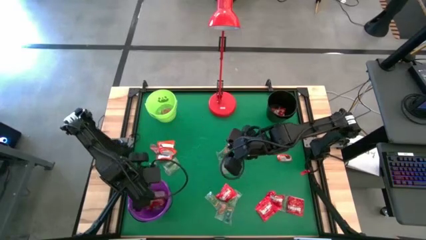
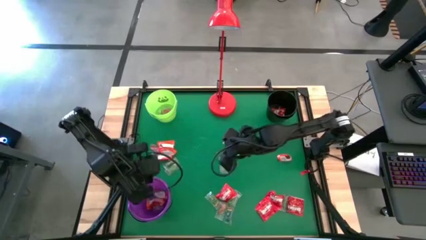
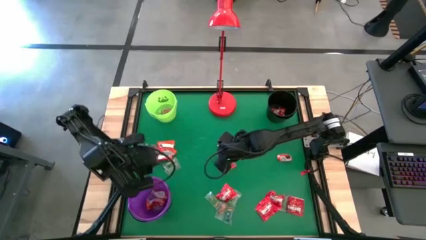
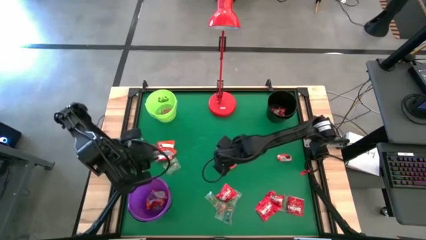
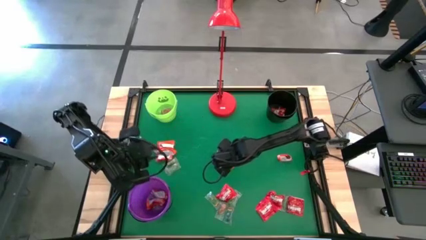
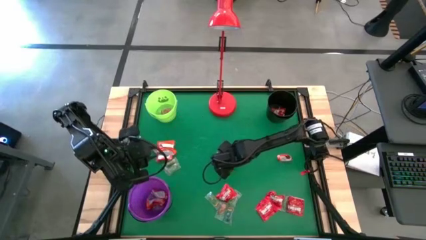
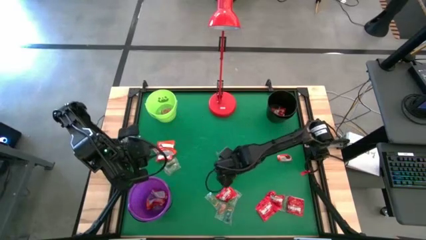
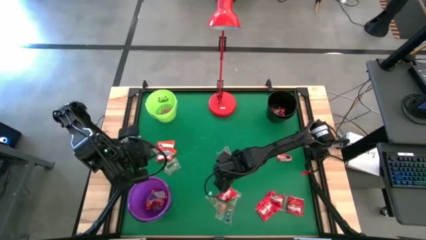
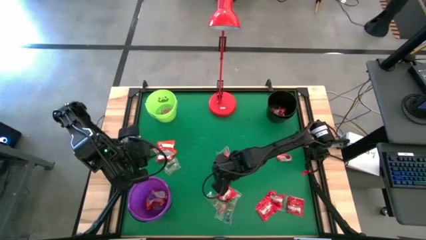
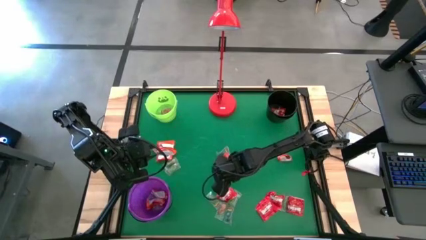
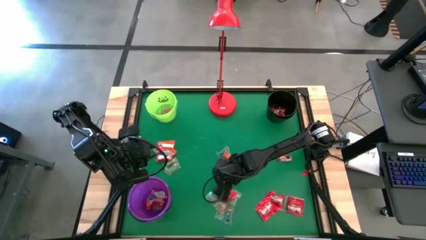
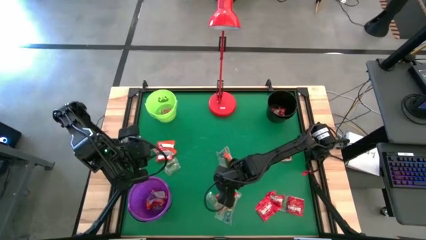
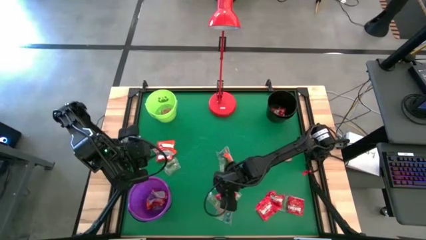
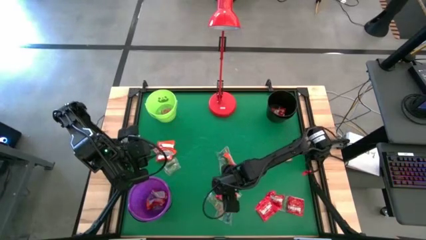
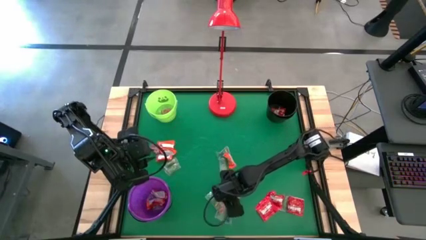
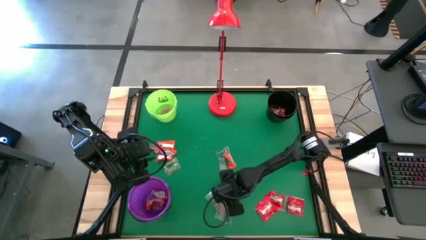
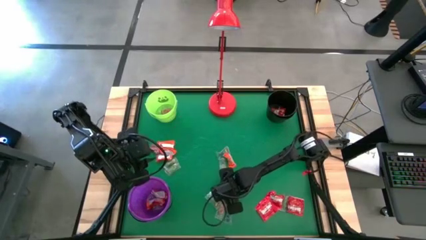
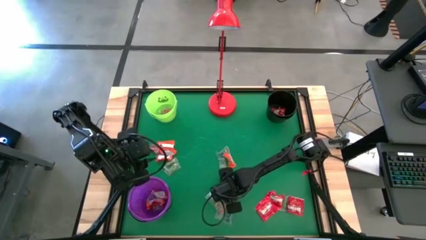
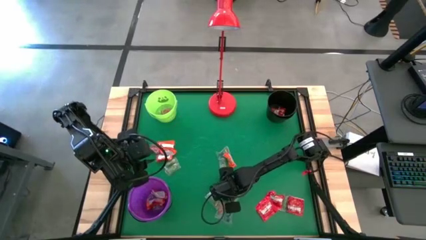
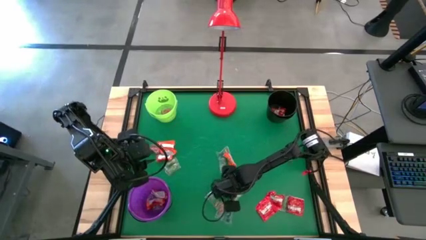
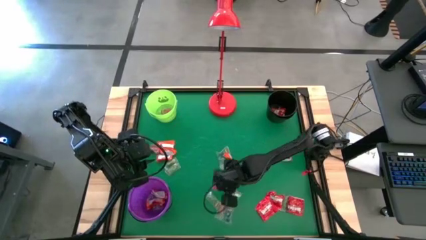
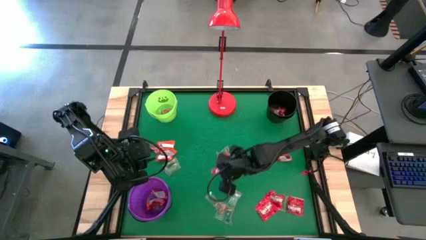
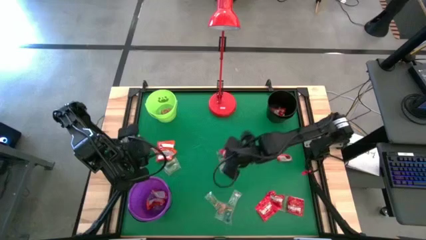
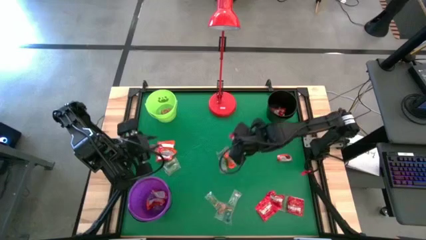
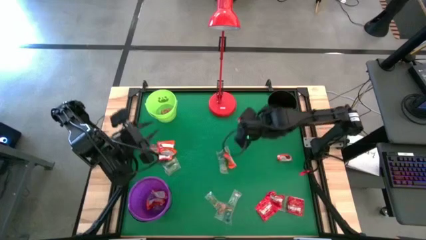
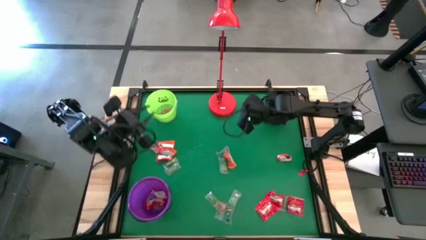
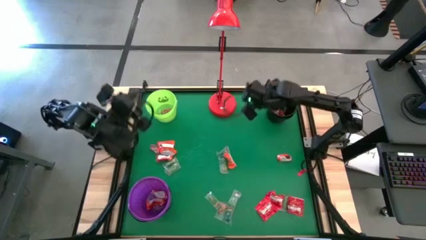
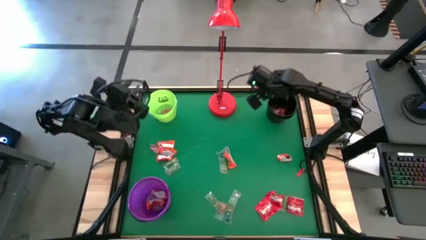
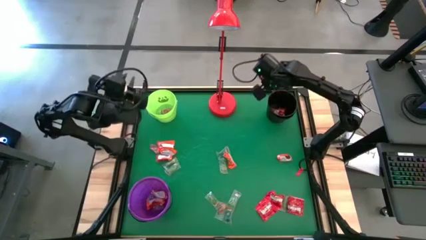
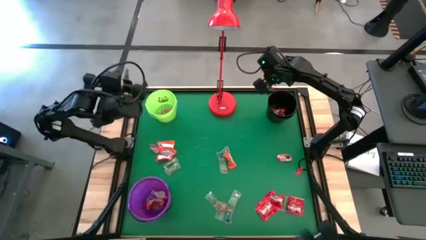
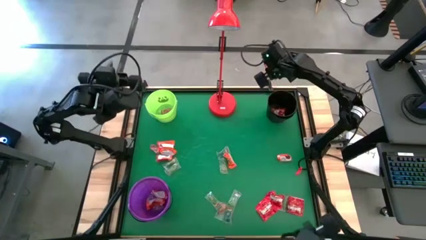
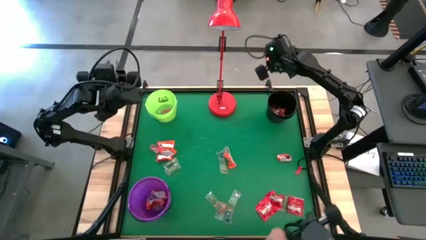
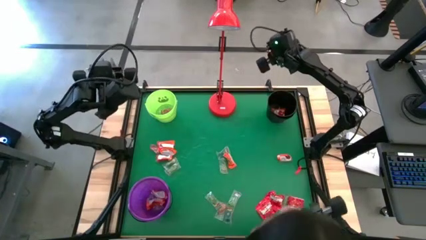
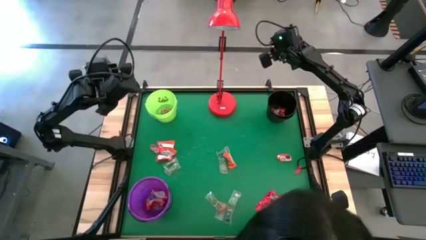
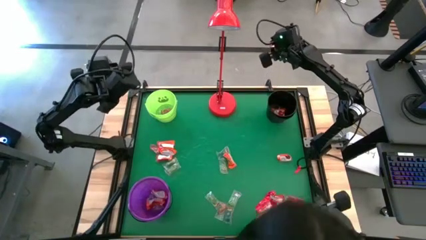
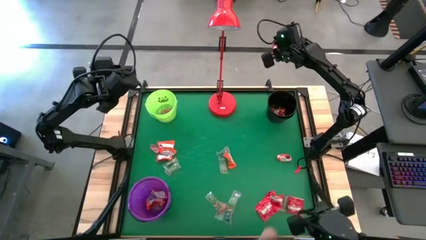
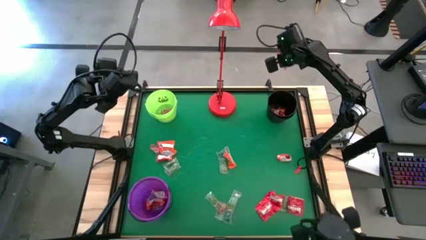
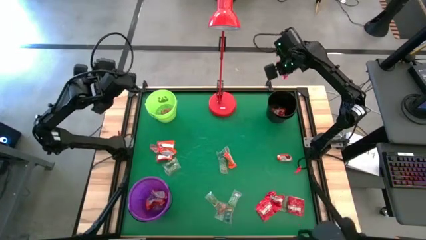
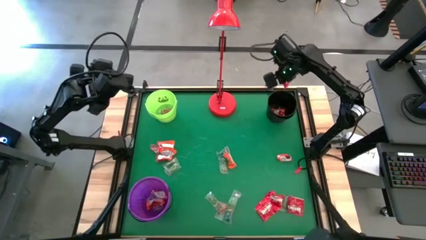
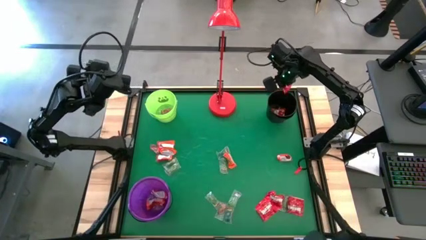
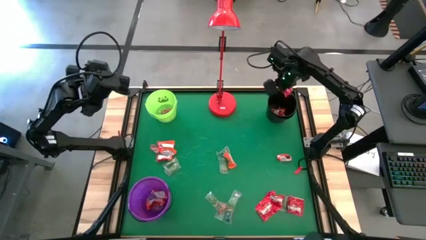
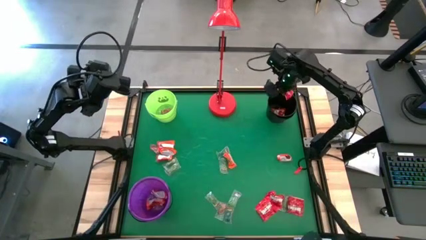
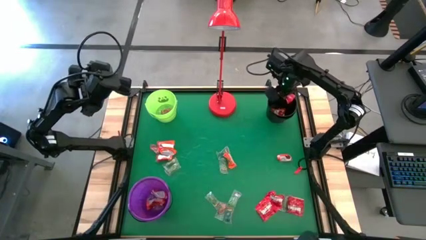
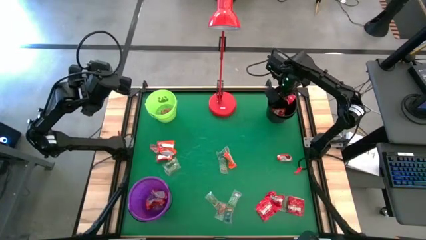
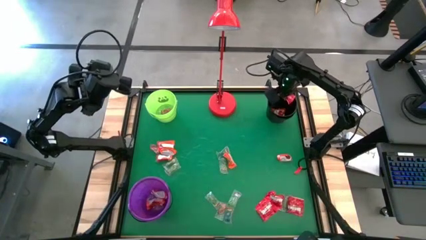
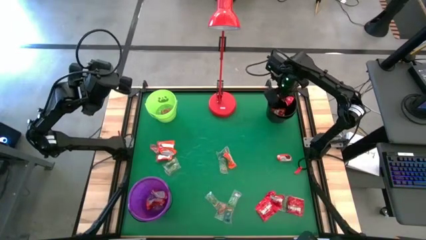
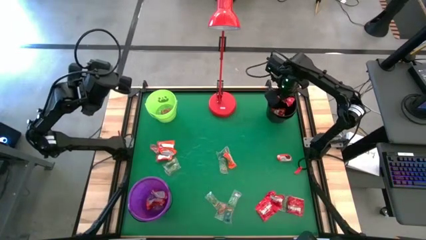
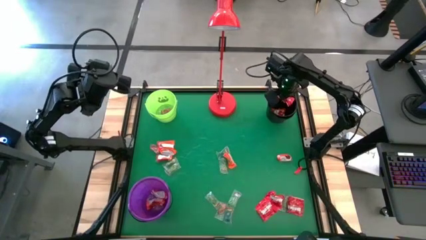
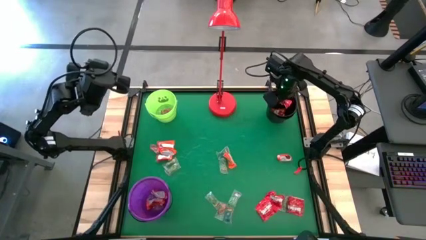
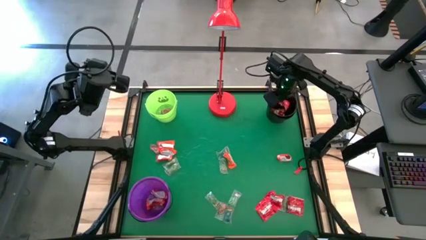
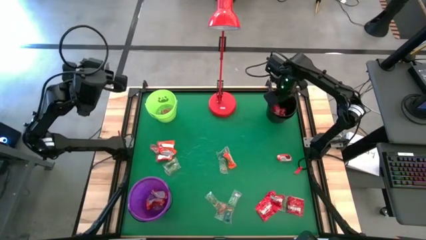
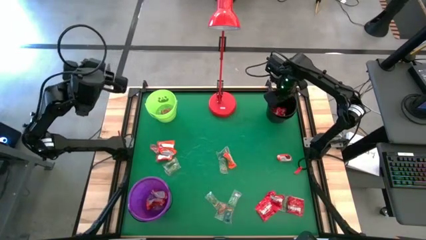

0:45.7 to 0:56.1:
Task: Sort candy
Put the red candy into the black bucket

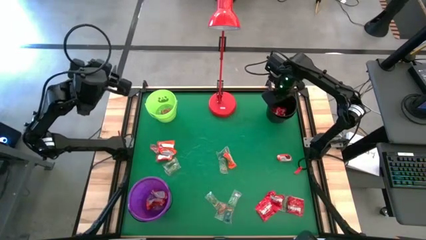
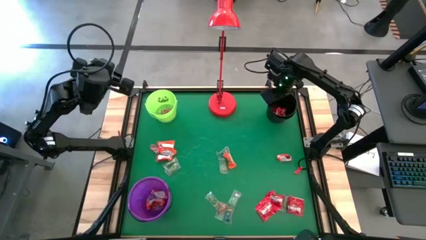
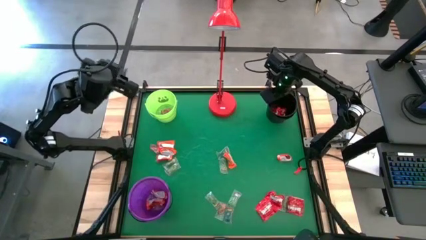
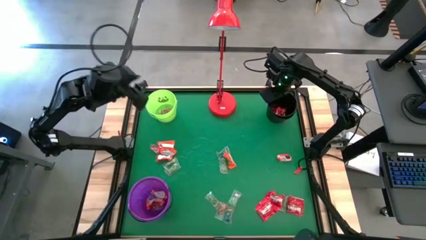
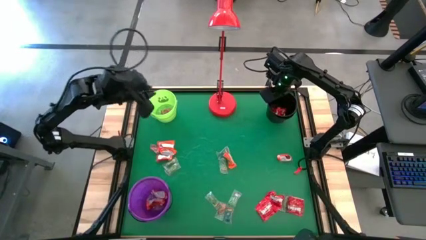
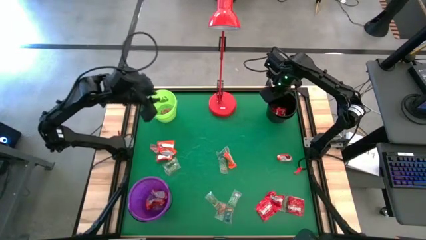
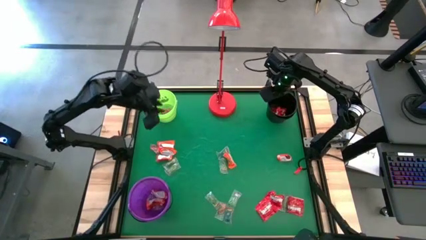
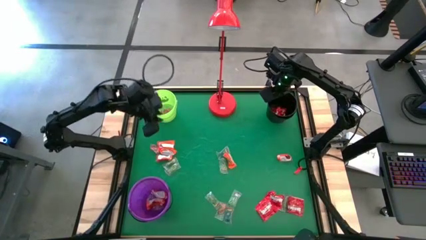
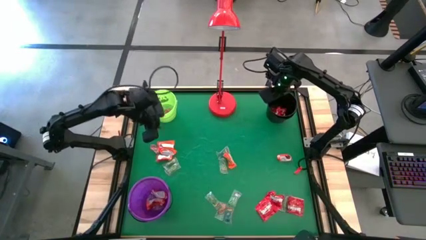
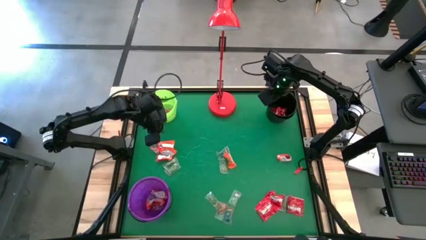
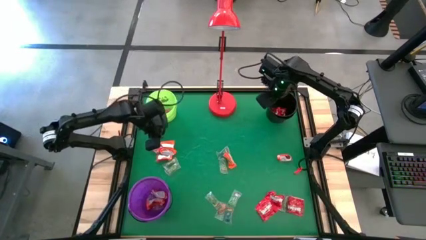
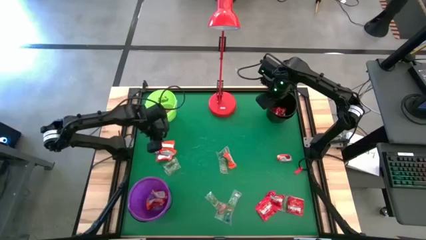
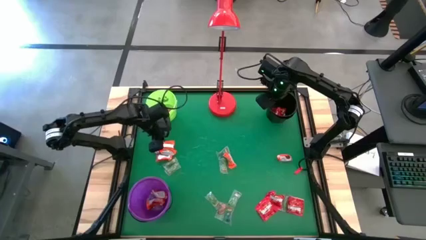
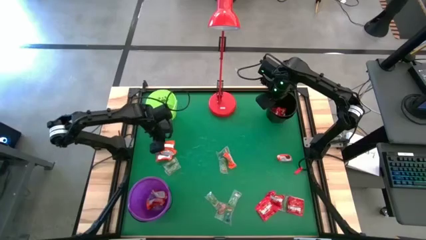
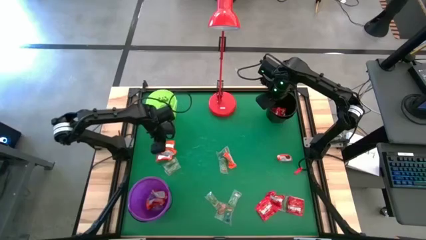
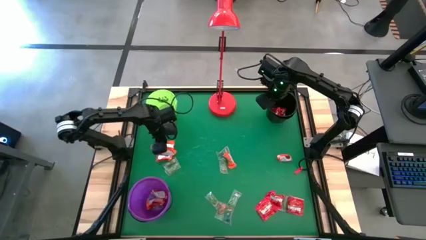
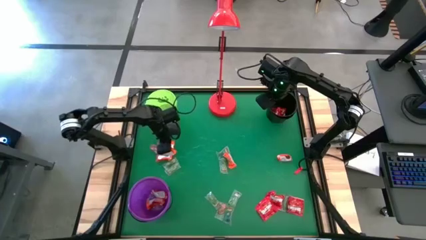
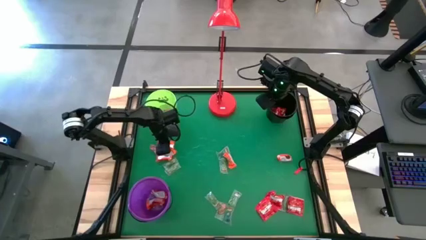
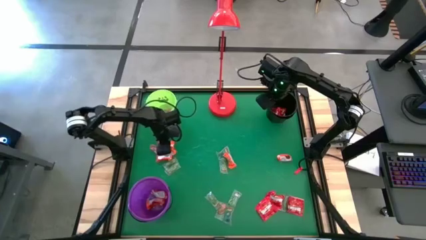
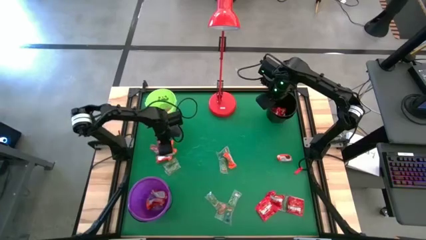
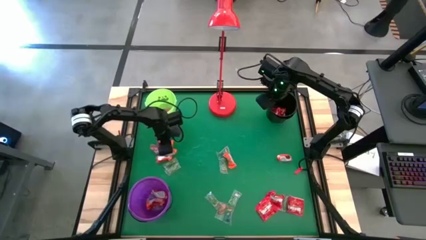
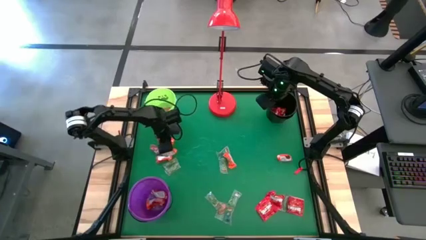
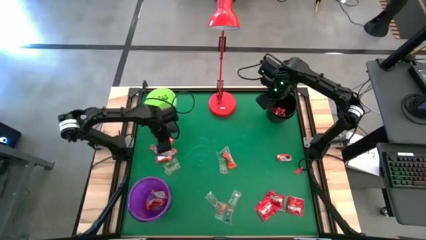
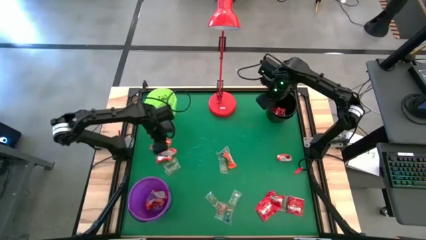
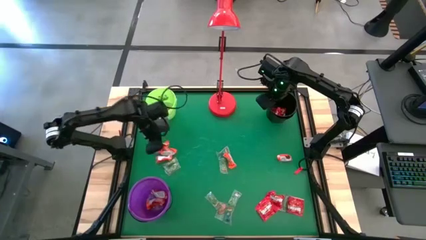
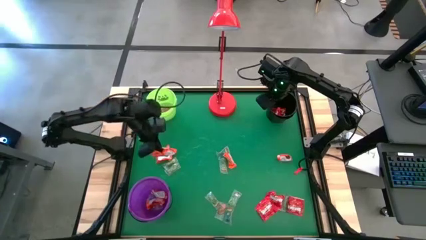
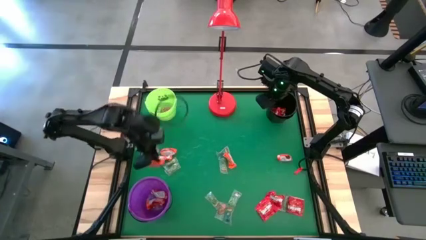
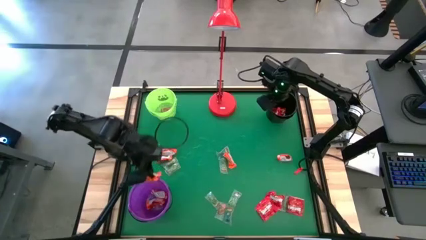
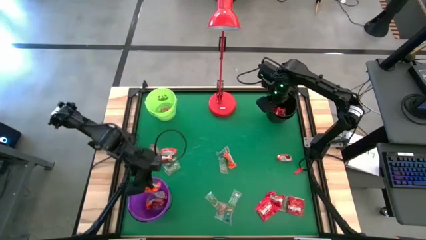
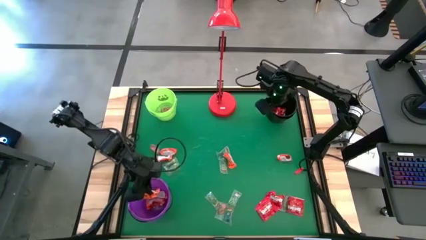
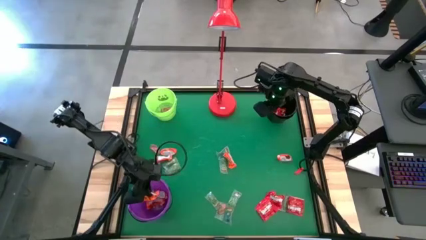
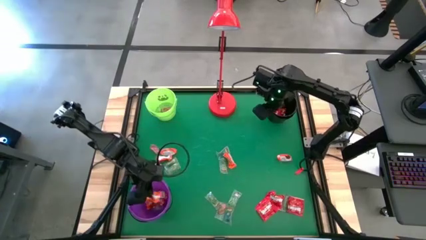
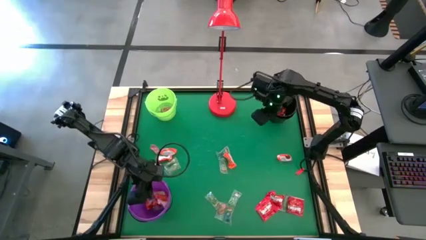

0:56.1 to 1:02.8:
Put the orange candy into the violet bucket
